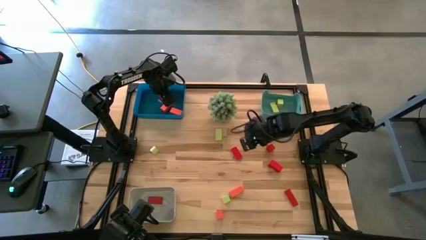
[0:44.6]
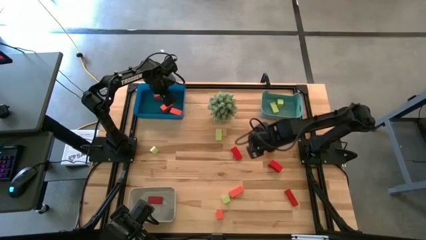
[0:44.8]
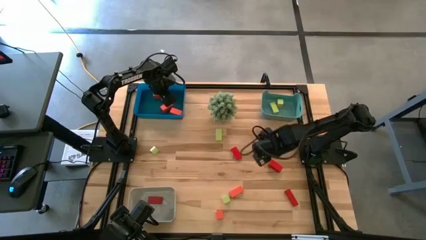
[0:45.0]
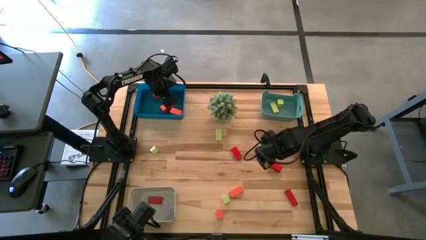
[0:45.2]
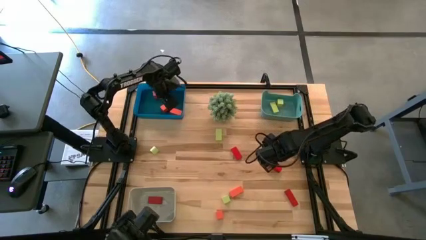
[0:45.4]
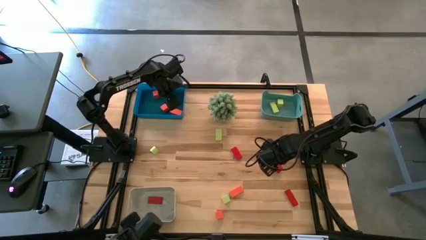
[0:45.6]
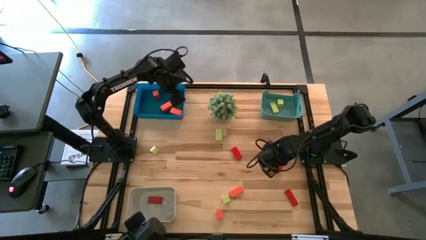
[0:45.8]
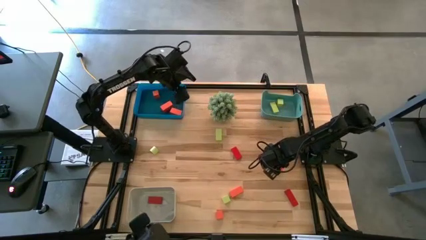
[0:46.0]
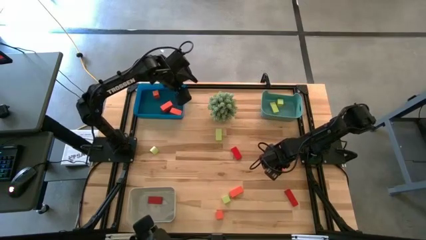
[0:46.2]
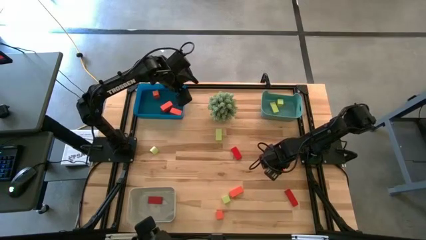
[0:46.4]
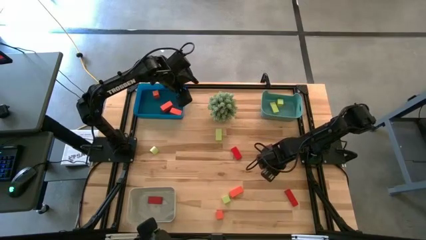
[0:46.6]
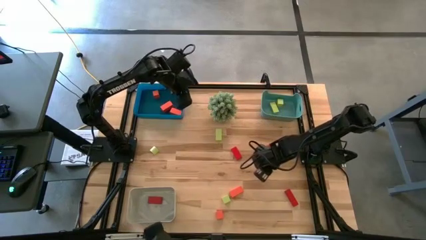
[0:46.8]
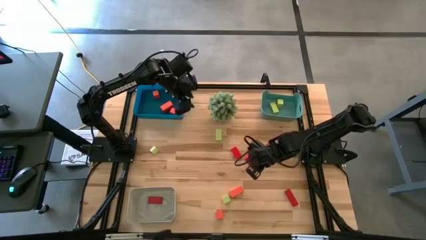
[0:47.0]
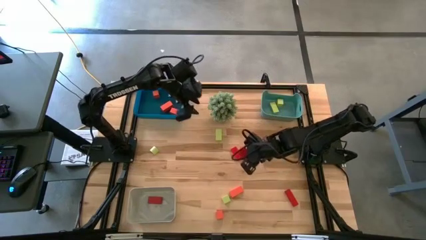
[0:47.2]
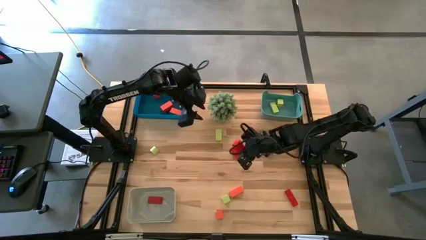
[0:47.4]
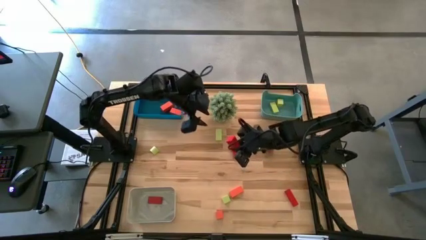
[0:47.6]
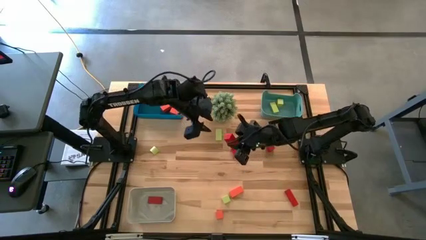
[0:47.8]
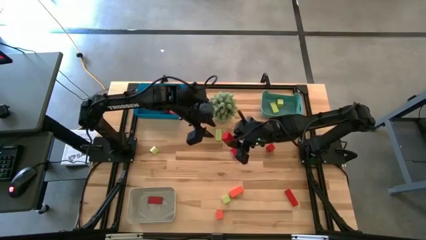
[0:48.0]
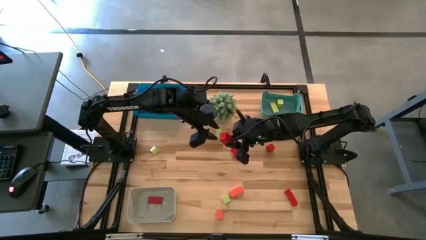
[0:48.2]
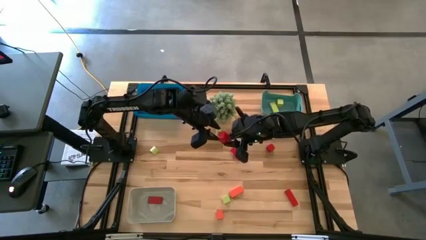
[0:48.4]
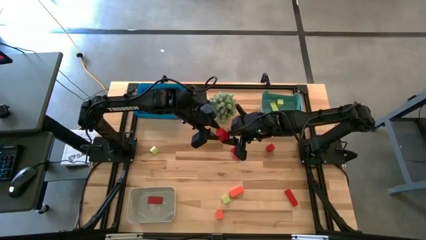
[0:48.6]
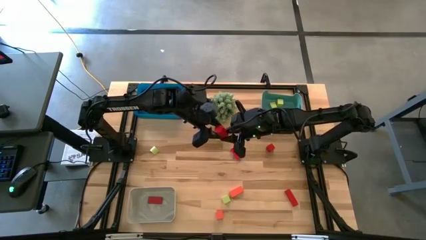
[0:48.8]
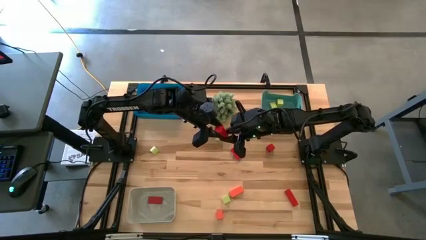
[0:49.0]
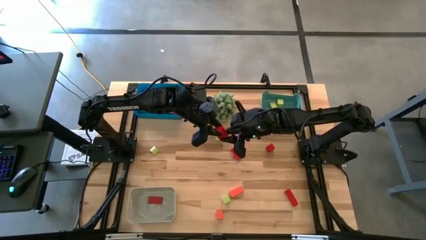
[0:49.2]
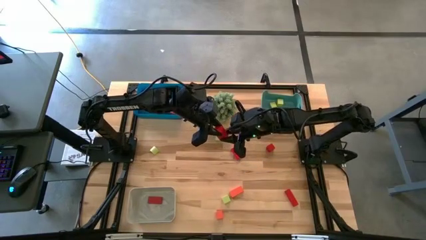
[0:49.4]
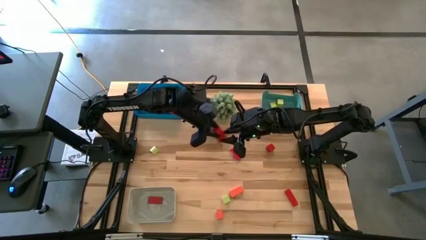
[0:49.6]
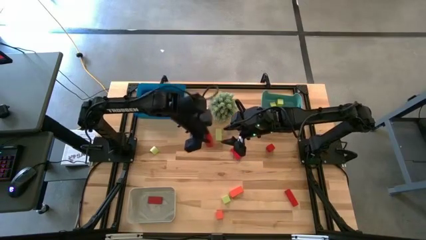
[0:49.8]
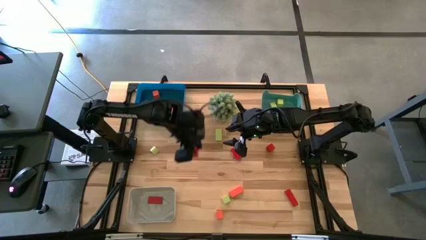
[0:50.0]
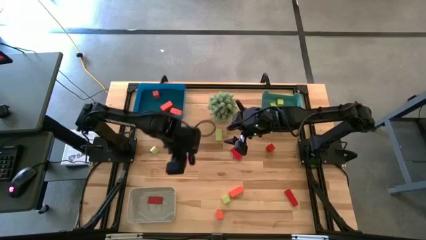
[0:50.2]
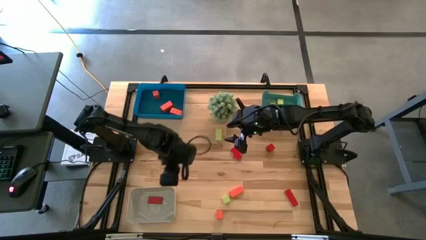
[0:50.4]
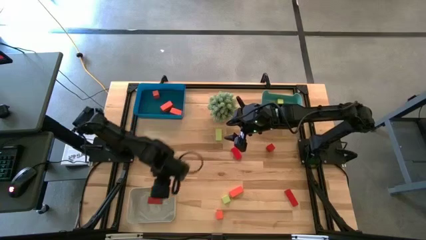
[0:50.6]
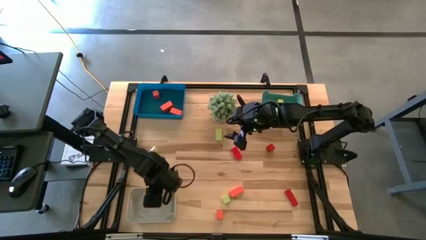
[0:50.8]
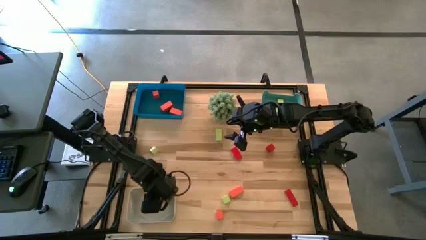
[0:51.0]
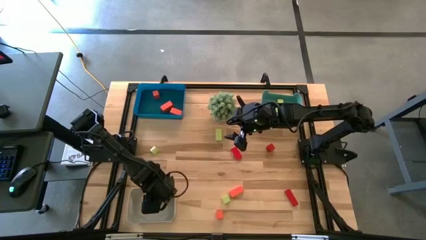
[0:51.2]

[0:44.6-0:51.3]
Task: Sort & place blocks by color
Put the red block into the white bin

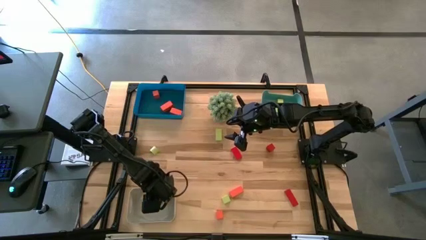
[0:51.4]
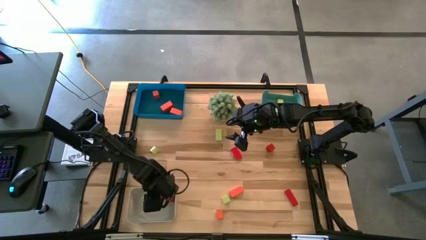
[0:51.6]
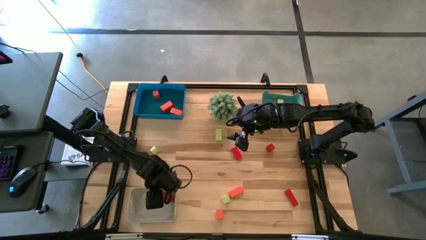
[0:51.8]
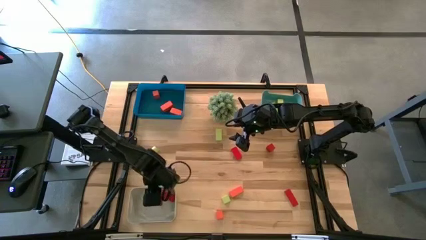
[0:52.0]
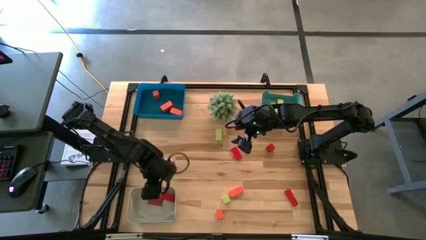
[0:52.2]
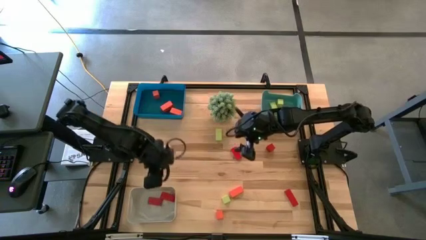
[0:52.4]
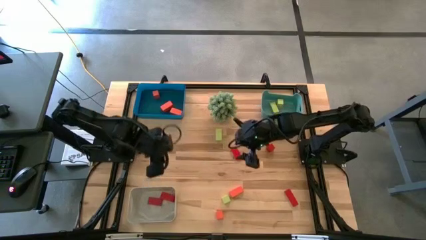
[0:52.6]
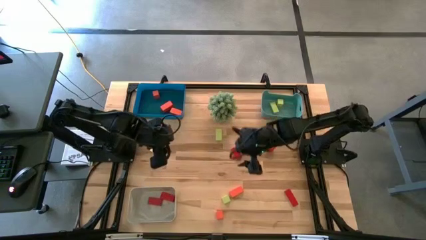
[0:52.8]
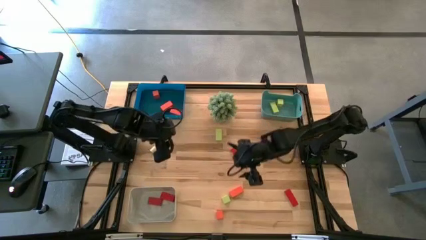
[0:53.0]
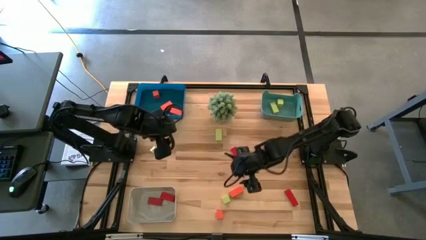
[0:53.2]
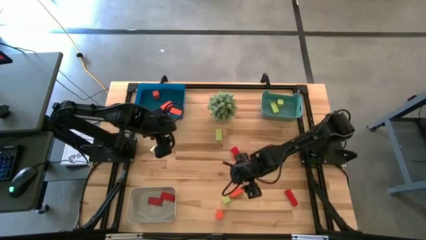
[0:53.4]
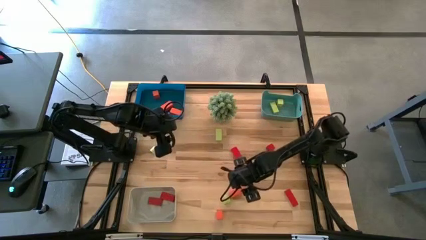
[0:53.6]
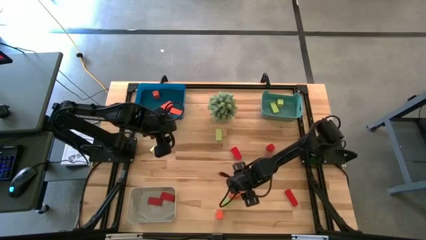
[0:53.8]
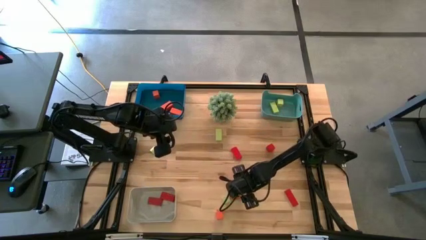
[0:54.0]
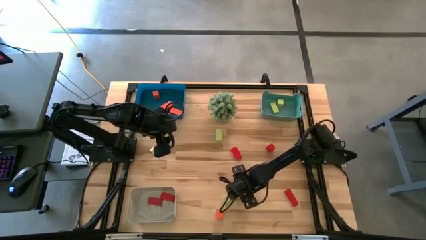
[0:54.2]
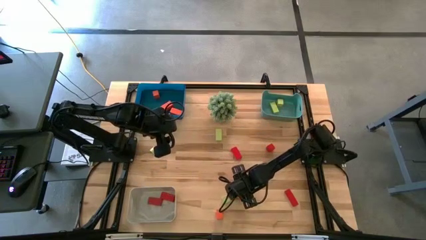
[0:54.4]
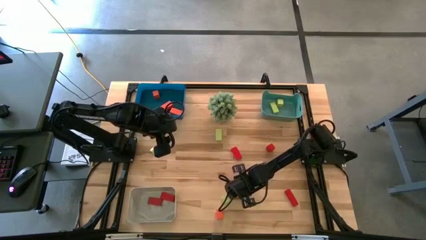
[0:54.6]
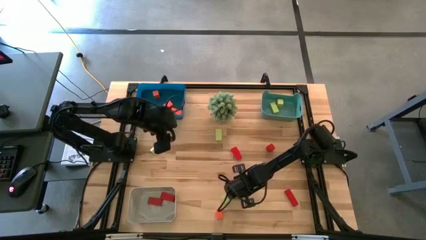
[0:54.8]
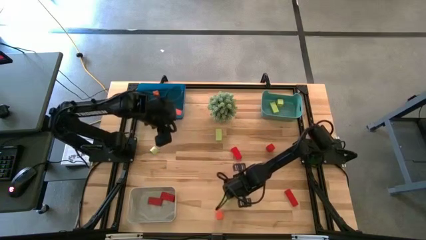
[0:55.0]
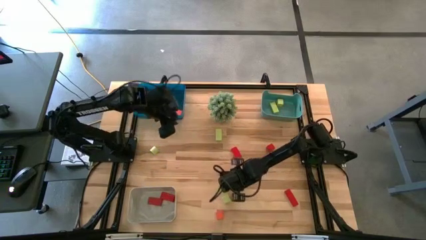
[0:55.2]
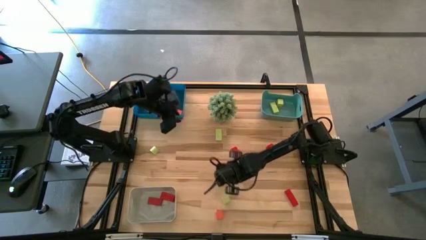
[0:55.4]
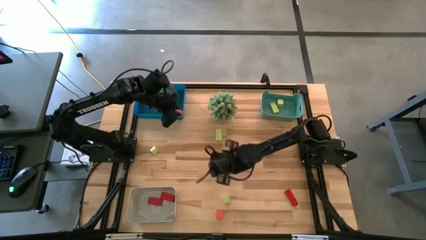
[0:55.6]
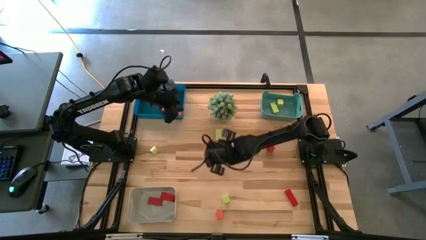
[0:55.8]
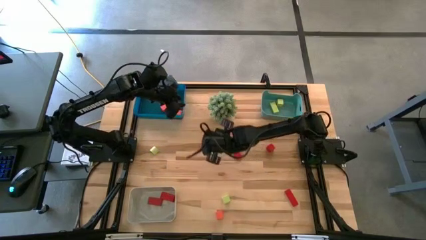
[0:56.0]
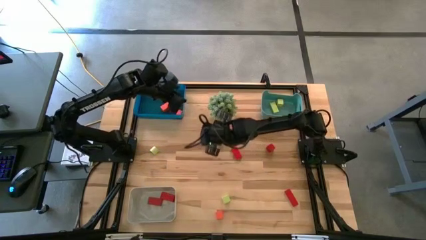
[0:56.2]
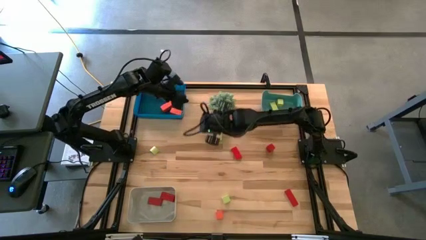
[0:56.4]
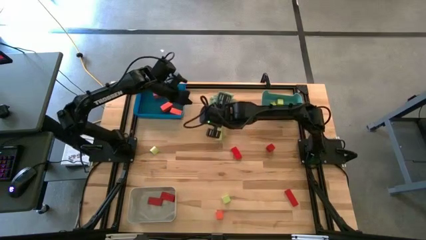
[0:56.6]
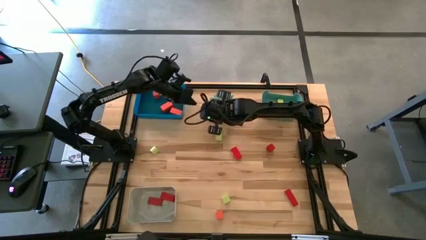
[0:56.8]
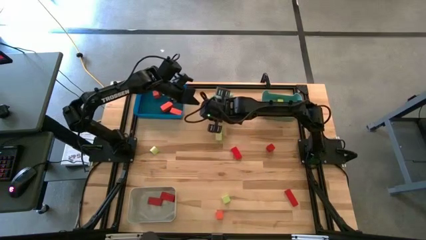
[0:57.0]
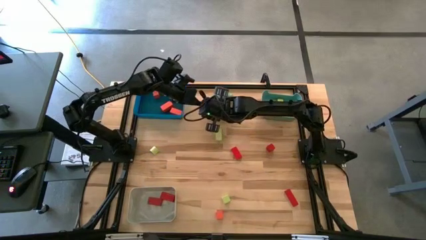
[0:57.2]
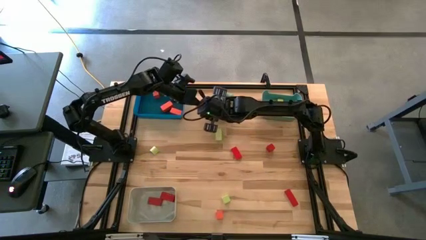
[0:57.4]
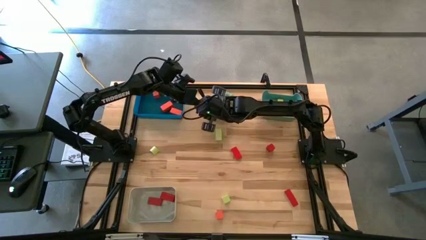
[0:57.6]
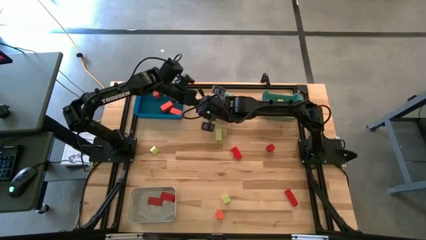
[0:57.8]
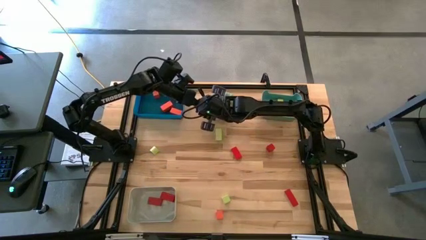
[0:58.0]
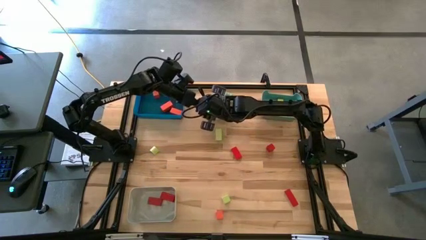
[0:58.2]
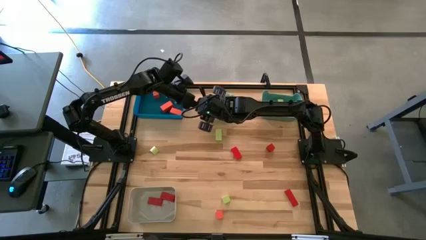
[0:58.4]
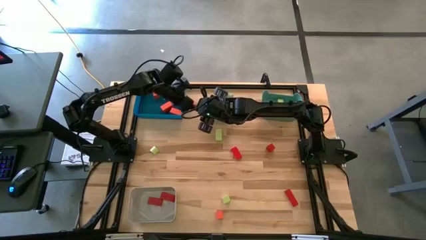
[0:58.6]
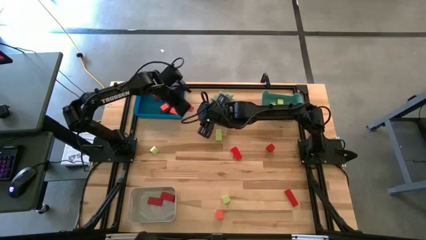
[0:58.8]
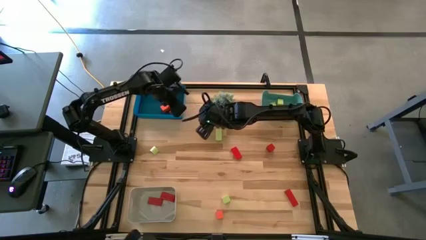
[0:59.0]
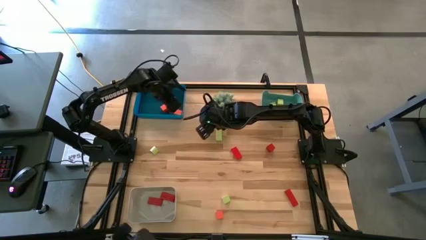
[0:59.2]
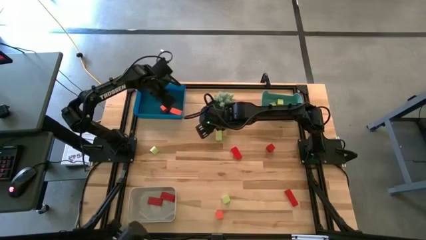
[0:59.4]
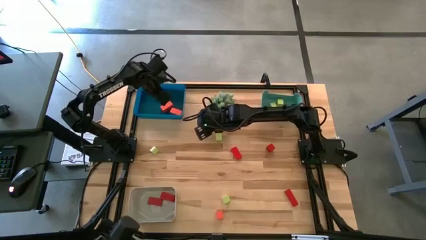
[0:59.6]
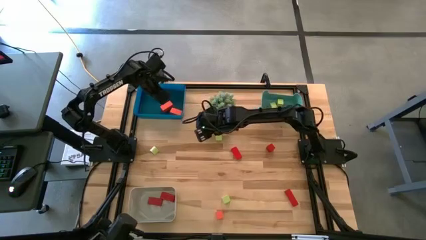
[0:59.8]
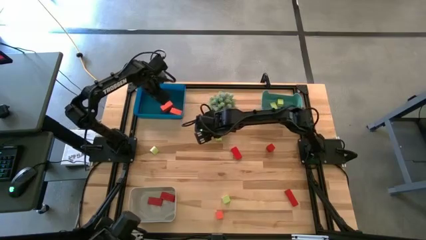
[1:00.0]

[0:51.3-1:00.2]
Put the orange block into the blue bin

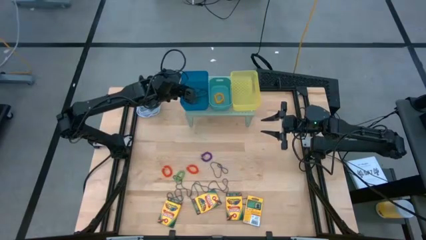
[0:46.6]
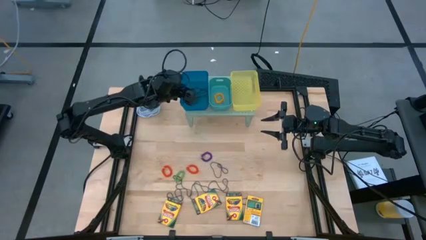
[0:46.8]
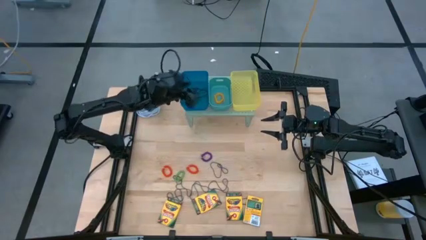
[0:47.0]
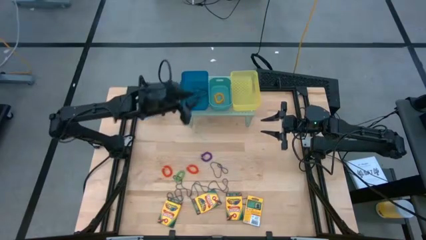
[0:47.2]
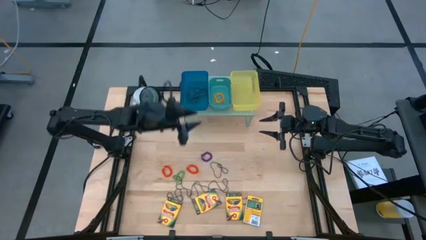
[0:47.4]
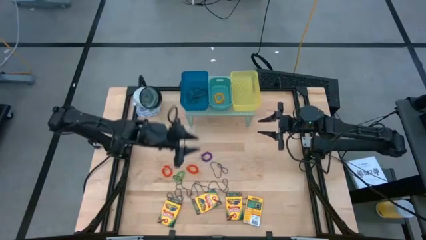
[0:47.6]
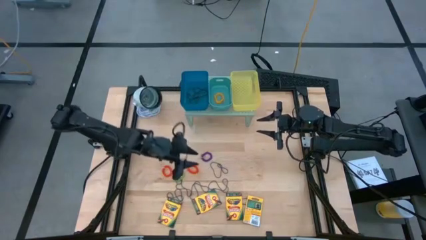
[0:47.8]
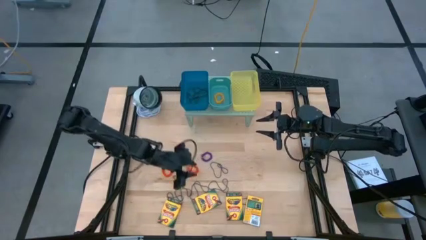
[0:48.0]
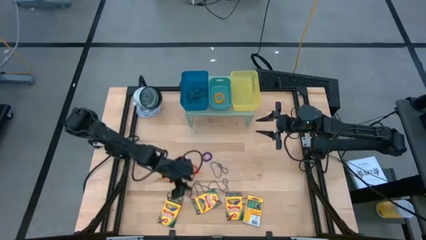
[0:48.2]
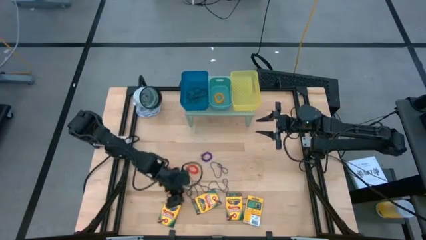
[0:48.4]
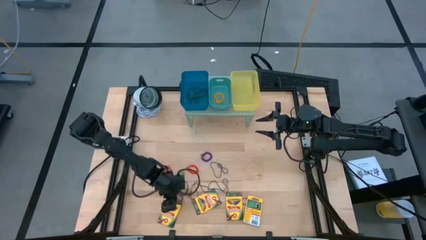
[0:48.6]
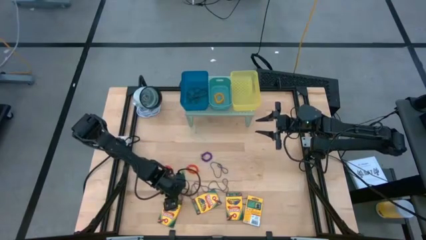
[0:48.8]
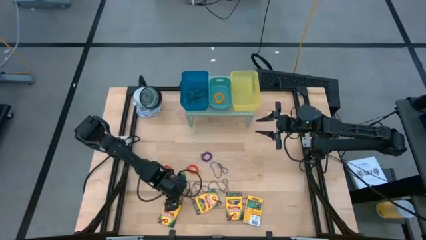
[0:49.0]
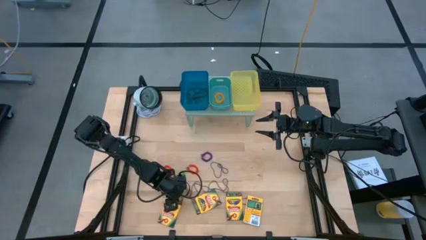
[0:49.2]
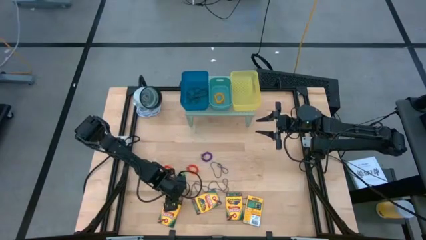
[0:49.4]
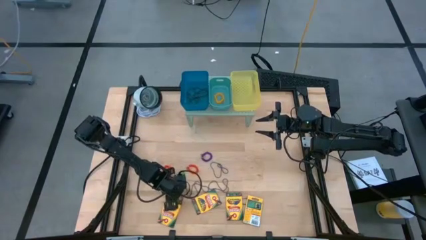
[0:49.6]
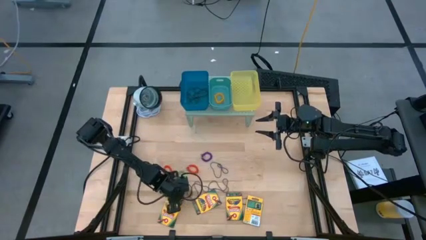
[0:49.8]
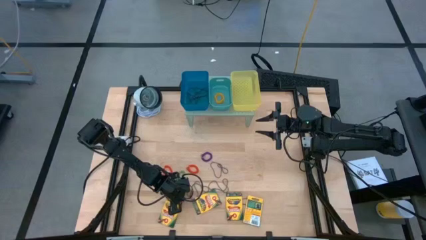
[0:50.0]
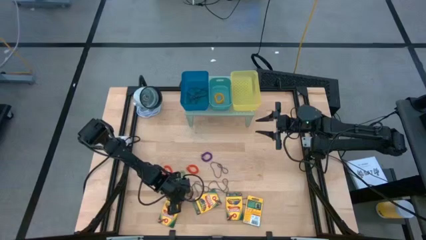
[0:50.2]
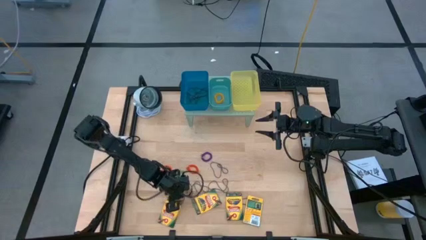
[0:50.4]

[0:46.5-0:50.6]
Task: Pick & Place Office Desk Supplies
Put the purple rubber band into the blue bin on the shelf
